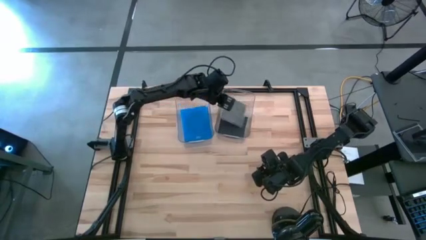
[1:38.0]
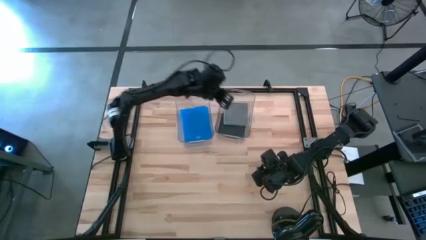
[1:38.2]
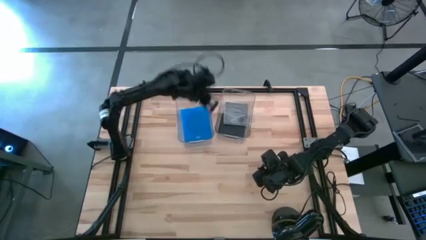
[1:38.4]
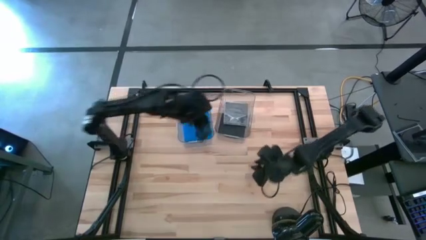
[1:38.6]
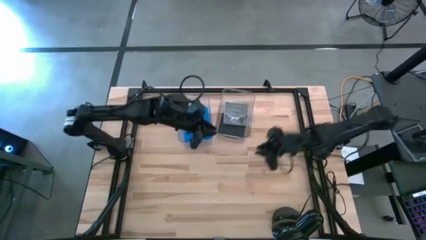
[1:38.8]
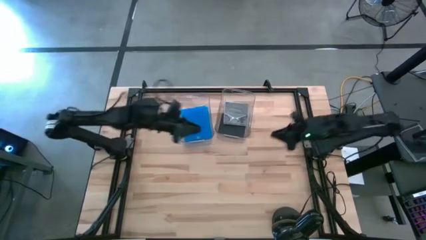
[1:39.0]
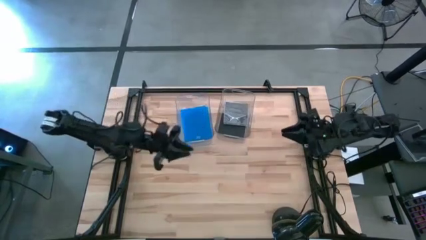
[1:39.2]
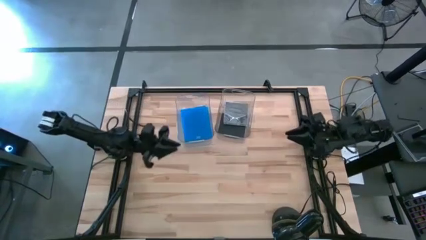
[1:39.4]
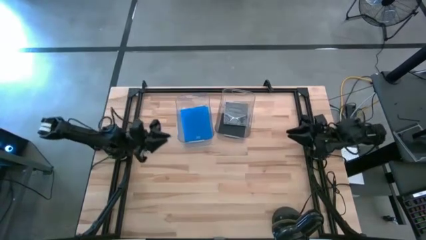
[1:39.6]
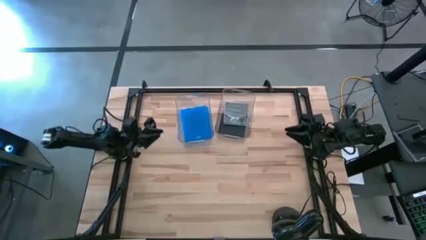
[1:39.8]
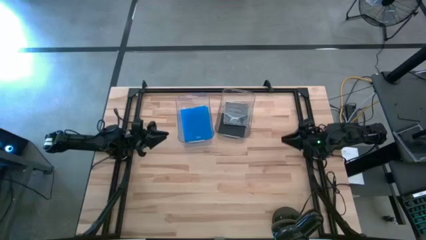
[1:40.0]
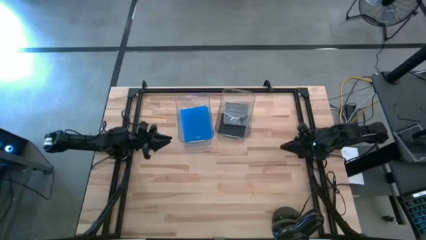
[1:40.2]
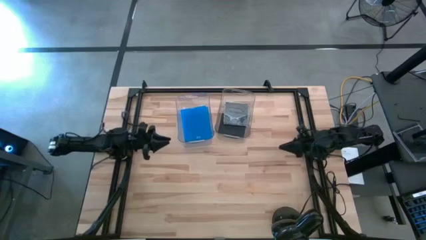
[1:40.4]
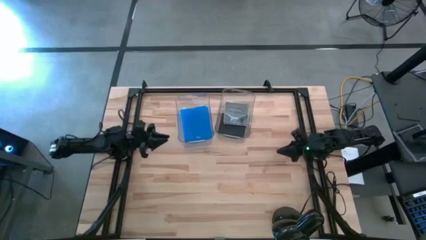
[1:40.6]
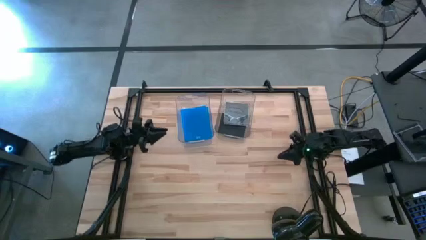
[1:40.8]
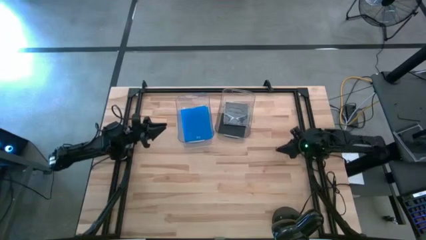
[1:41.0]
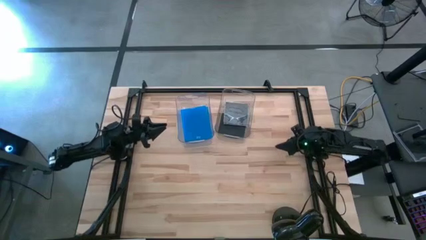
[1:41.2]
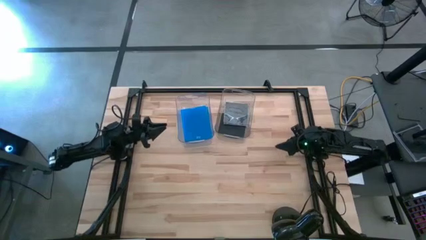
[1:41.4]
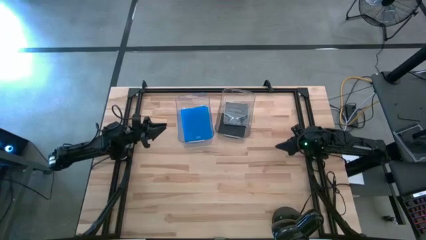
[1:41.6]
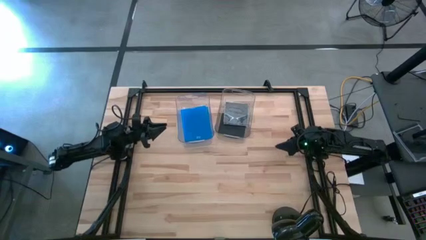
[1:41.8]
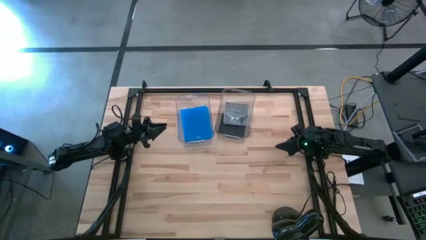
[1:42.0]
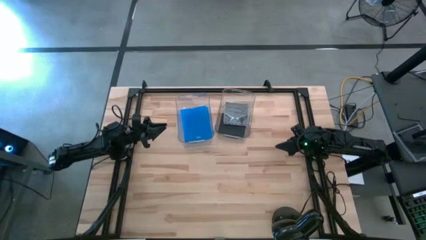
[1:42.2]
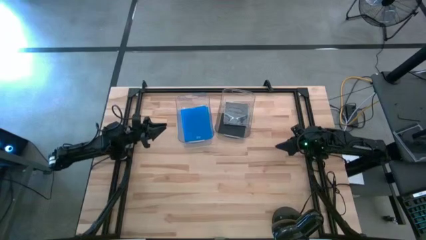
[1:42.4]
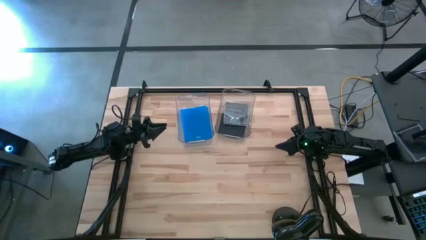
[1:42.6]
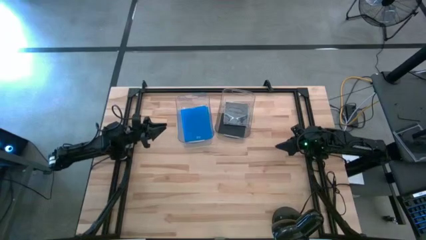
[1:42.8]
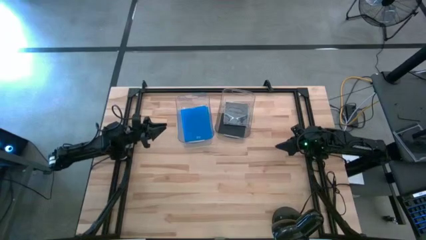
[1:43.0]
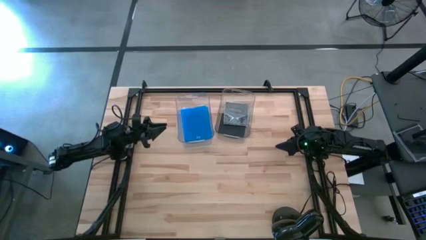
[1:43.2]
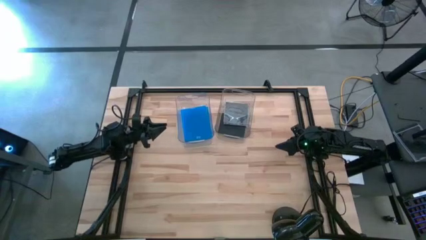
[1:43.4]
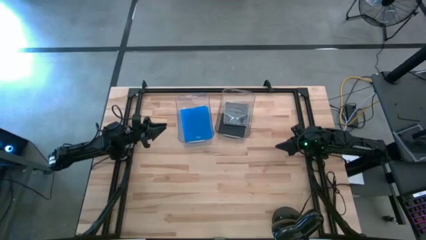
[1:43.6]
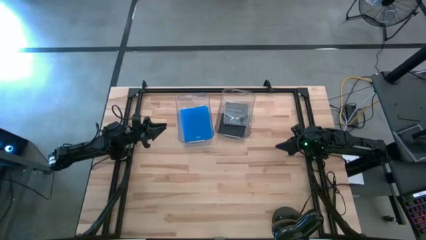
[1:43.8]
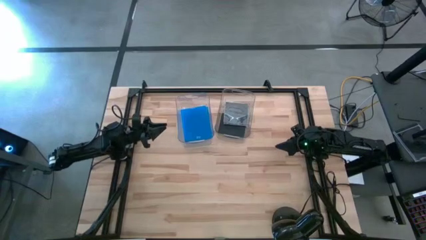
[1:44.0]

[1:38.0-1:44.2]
Task: Pick & place jewel cases by type
Return to Home Position

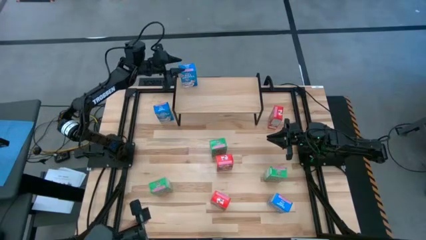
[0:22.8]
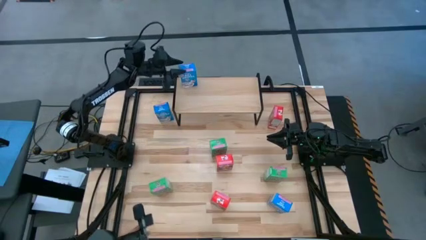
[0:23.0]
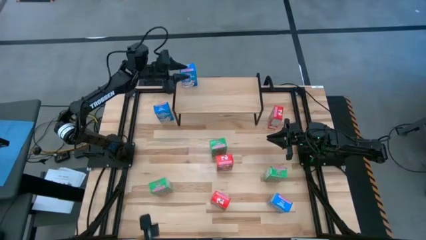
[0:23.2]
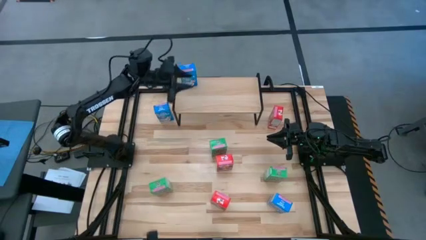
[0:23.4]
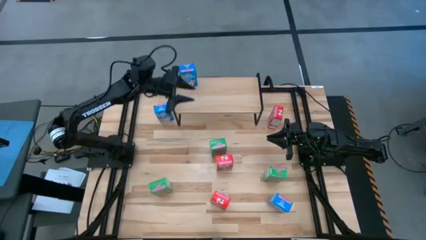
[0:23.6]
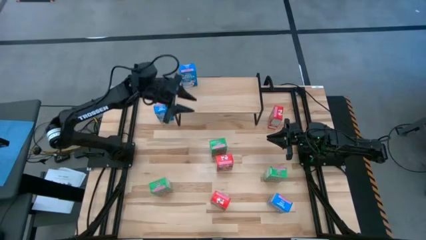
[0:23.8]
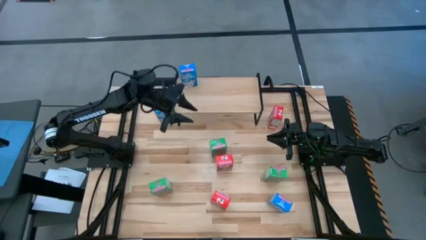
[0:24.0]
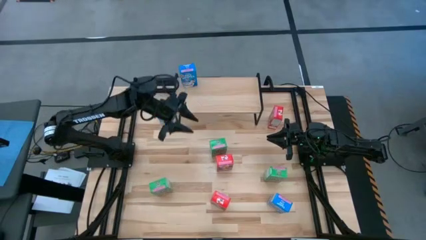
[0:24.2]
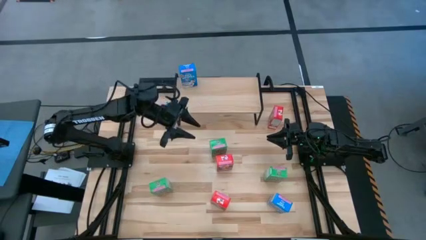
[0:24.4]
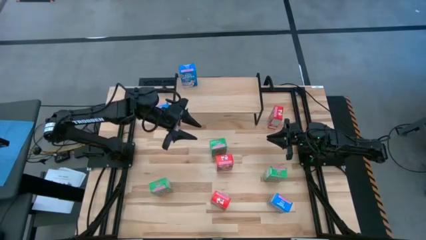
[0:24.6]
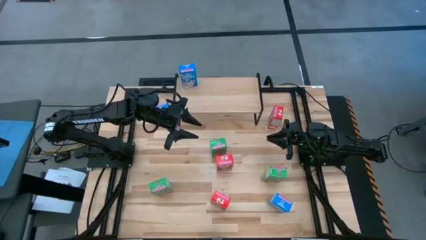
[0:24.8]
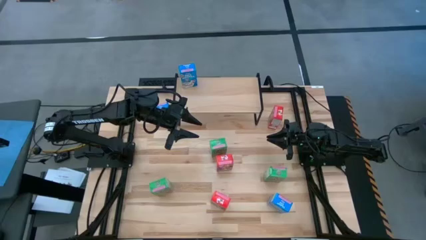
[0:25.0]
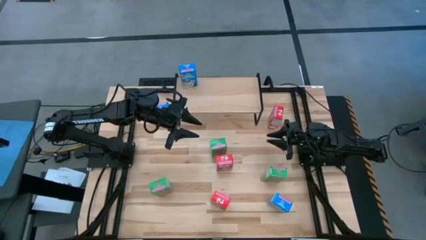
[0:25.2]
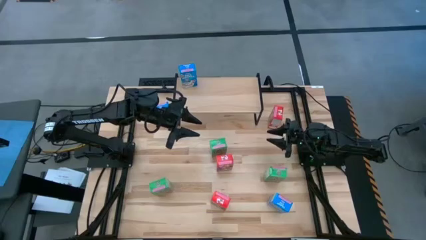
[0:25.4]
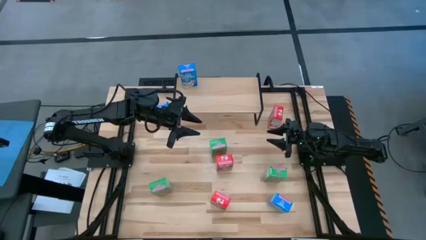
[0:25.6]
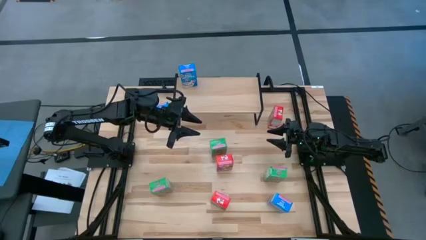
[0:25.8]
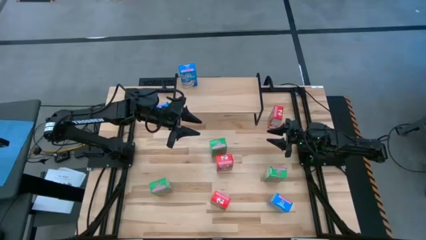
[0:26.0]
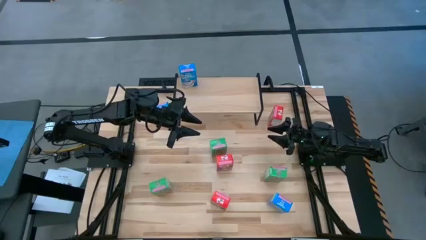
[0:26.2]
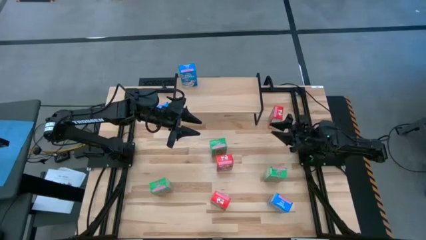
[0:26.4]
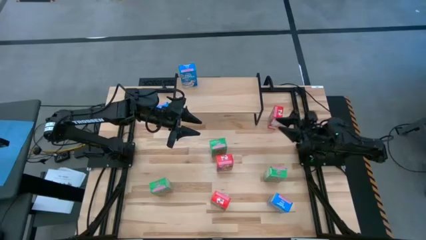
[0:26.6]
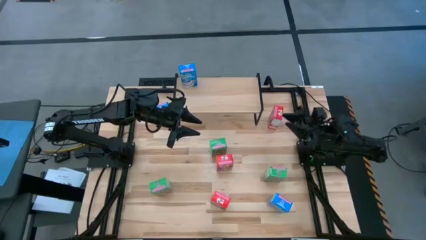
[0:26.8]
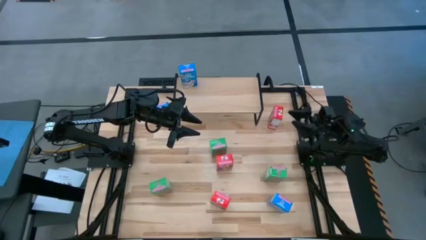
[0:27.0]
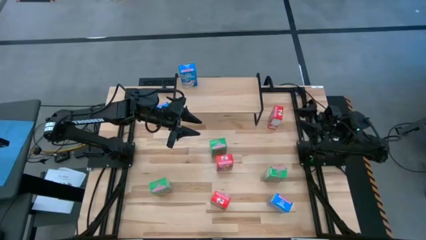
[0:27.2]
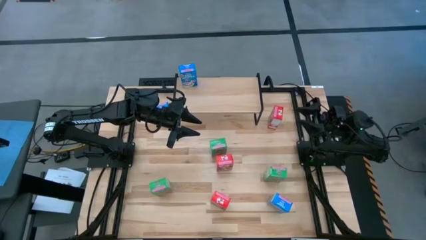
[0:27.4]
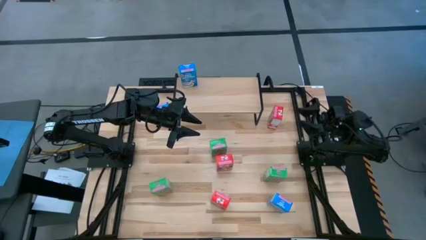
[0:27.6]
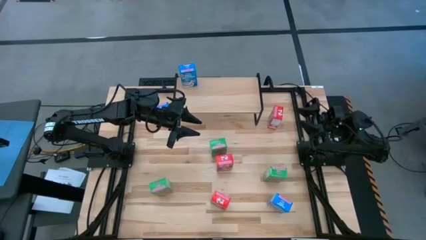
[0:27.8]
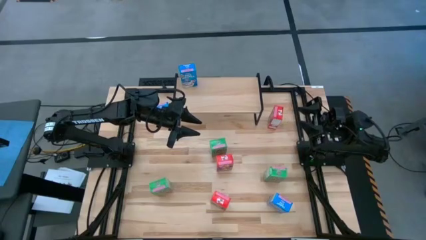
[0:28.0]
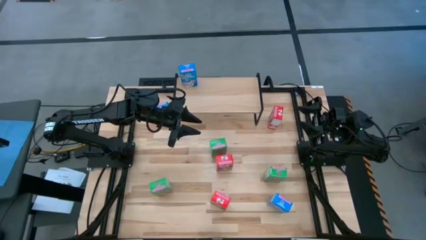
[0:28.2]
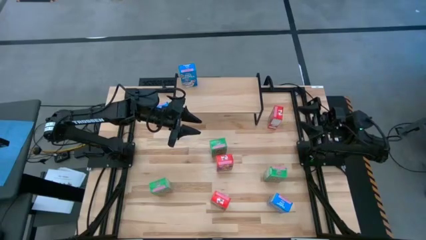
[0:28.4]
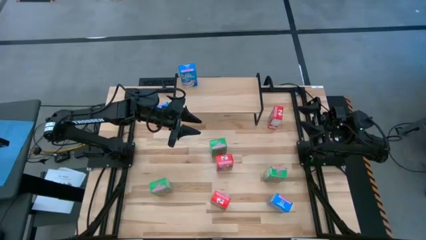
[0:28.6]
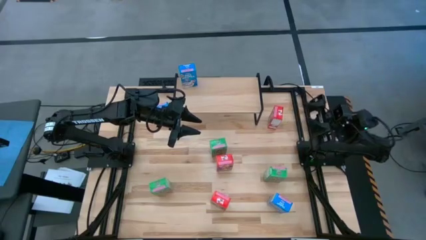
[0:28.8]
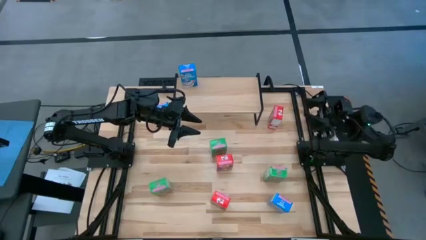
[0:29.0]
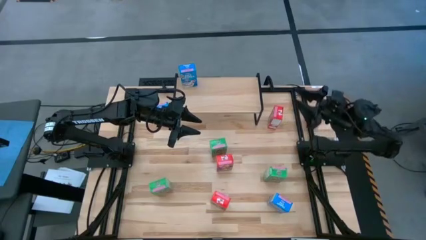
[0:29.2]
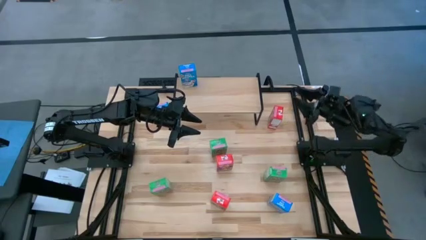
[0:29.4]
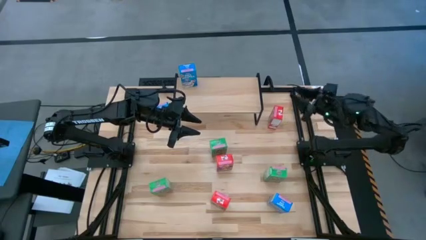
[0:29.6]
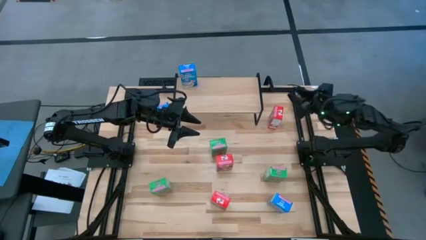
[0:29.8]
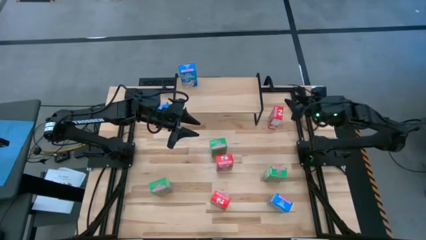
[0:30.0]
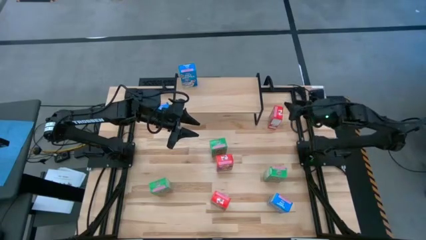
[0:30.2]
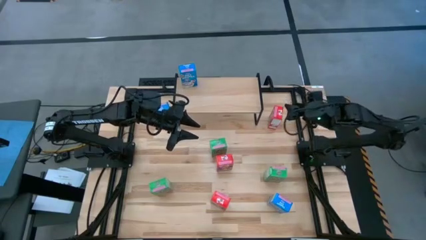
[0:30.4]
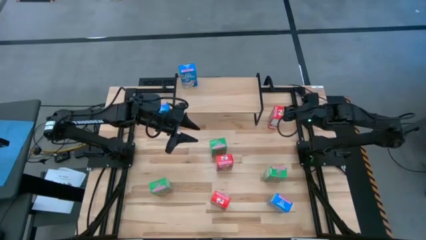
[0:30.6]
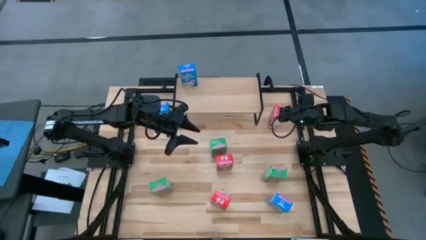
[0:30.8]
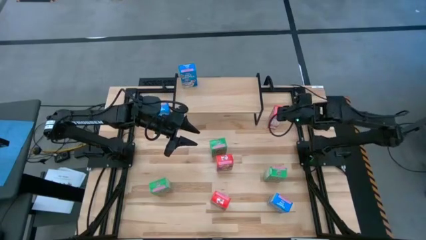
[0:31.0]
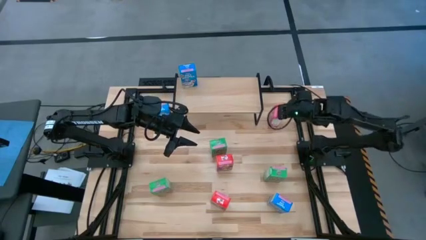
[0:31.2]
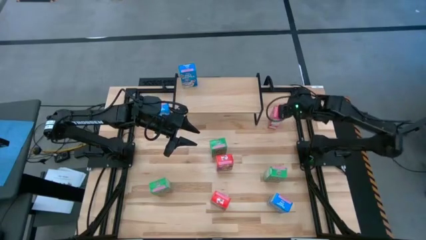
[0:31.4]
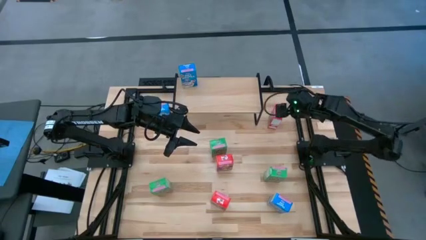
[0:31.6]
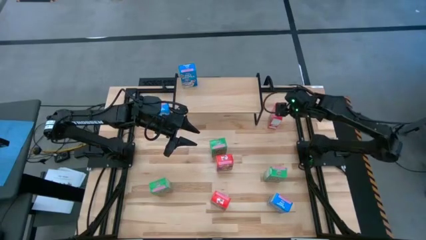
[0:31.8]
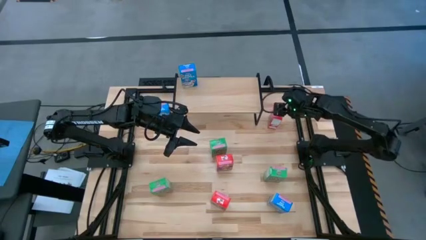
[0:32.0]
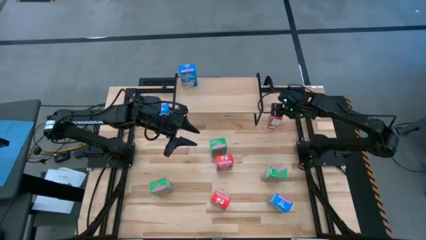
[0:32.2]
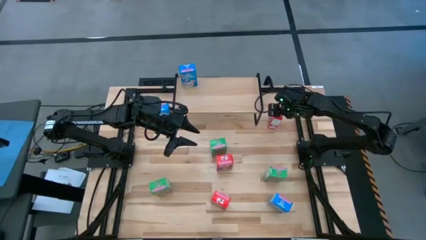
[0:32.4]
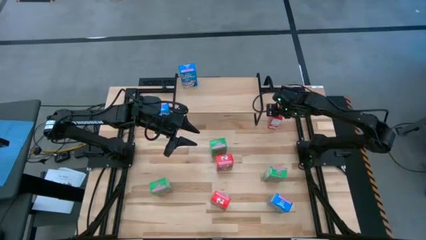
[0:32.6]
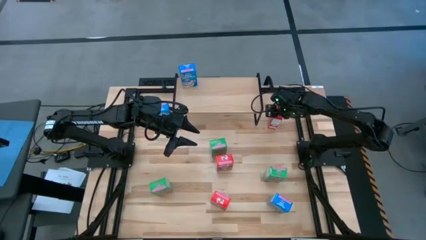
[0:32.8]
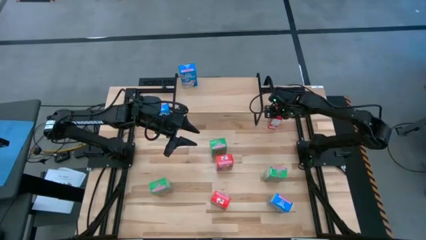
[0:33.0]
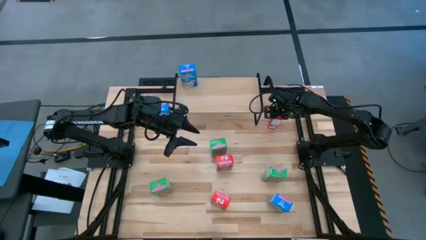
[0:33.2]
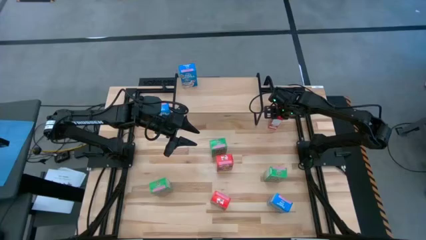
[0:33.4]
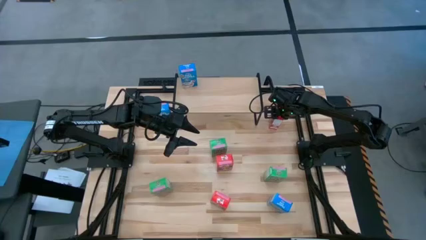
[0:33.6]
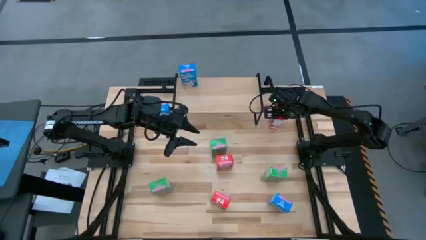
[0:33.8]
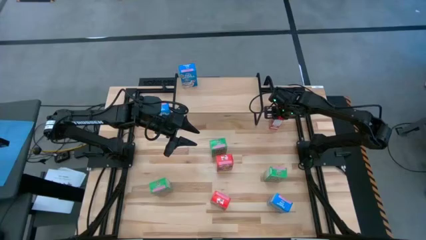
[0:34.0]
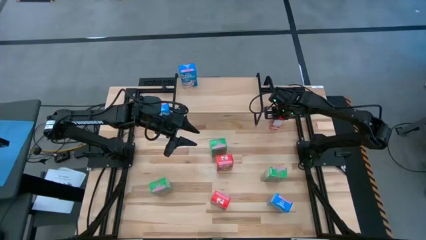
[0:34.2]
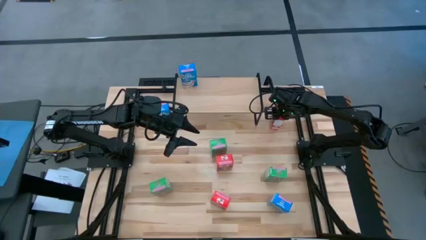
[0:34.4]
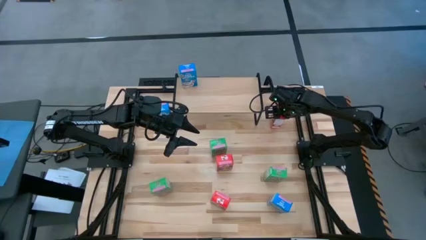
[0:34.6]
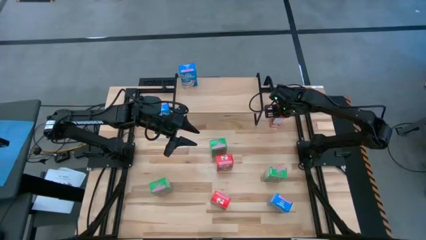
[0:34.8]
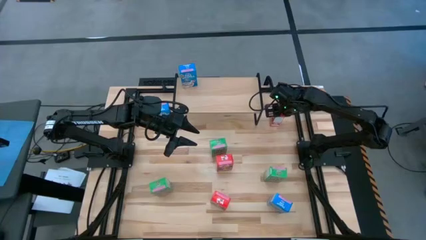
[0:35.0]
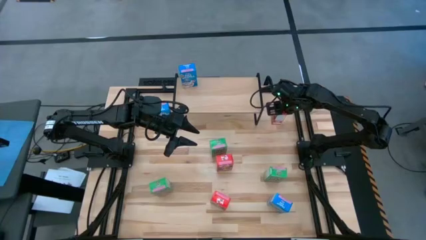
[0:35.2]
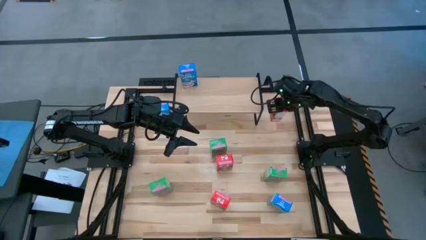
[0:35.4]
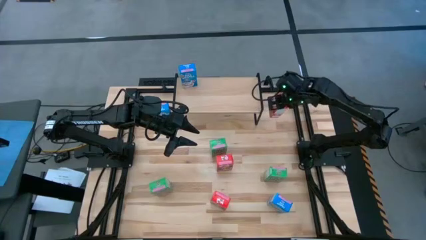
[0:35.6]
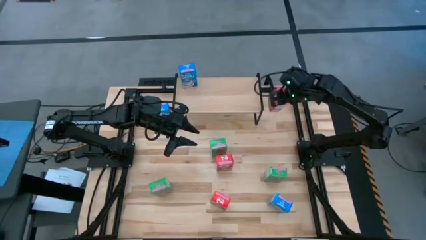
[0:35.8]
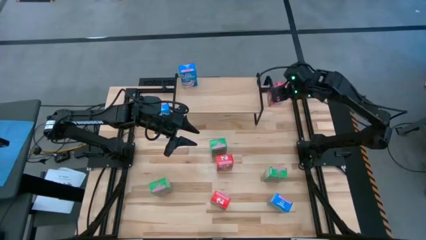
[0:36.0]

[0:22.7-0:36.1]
Task: Stack cereal on shelf
Put the top right red cereal box on the shelf
